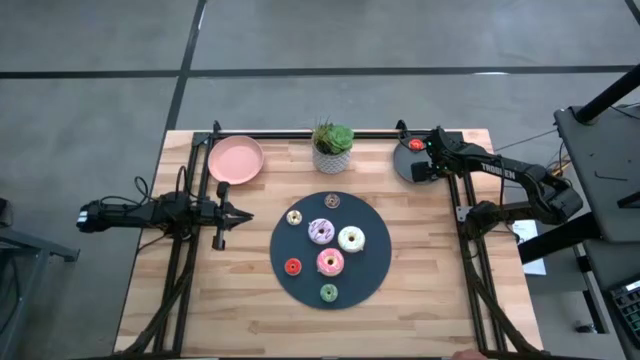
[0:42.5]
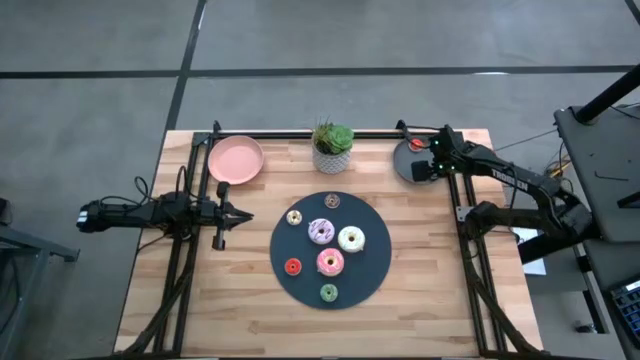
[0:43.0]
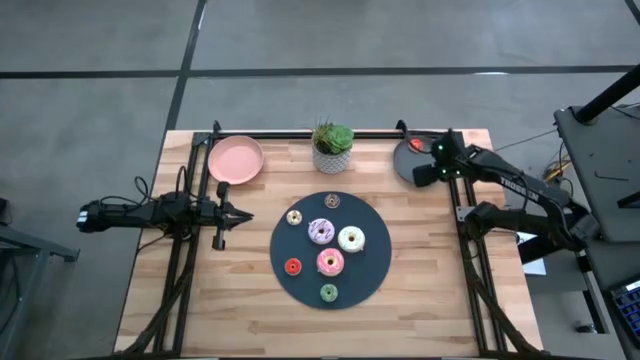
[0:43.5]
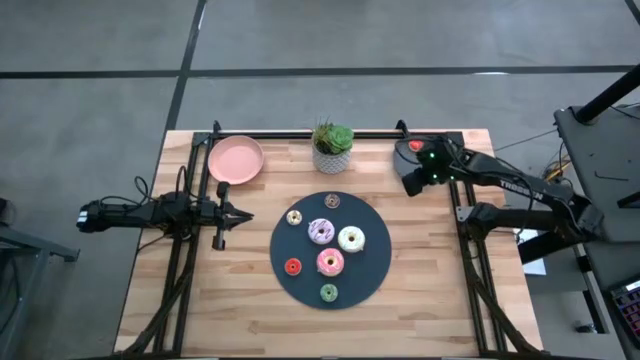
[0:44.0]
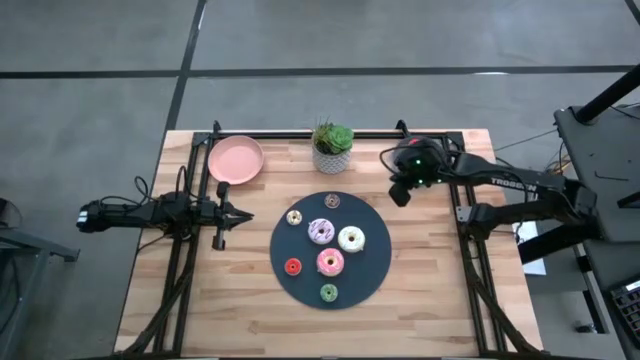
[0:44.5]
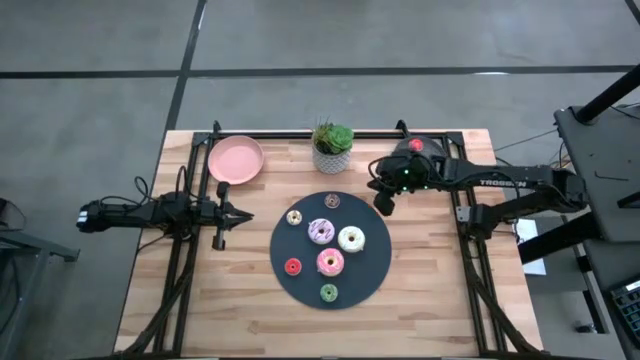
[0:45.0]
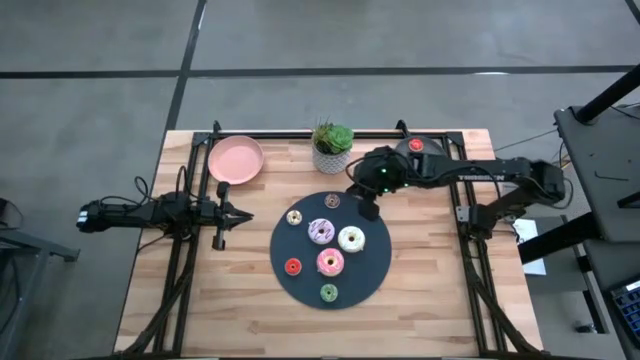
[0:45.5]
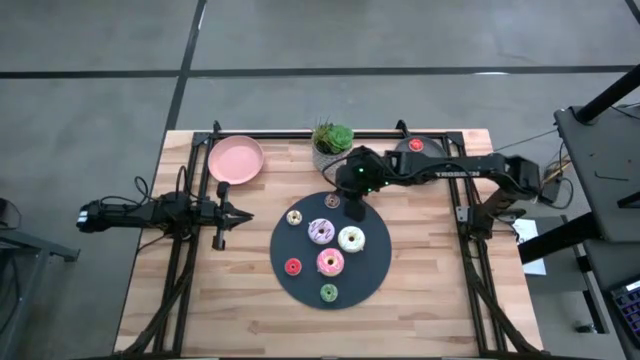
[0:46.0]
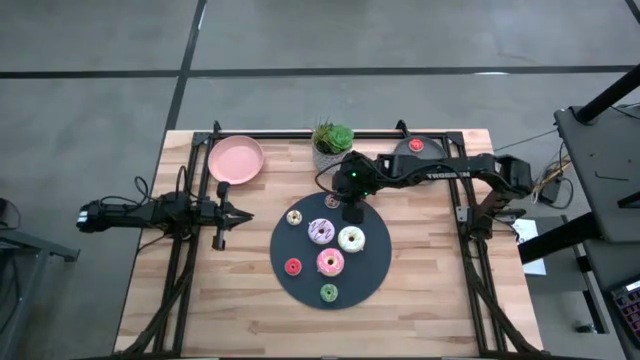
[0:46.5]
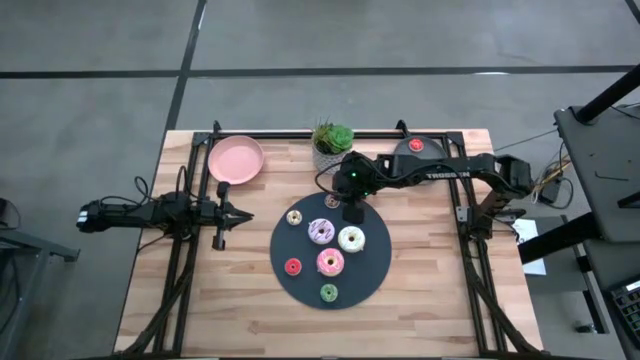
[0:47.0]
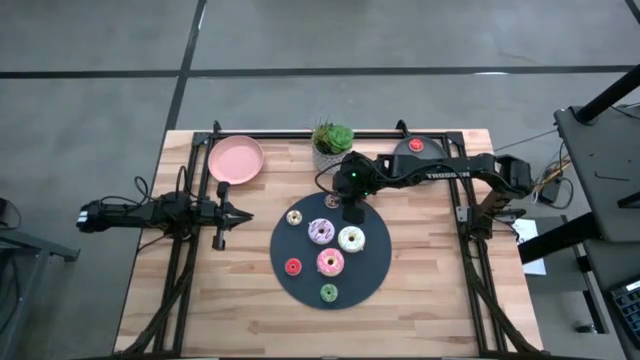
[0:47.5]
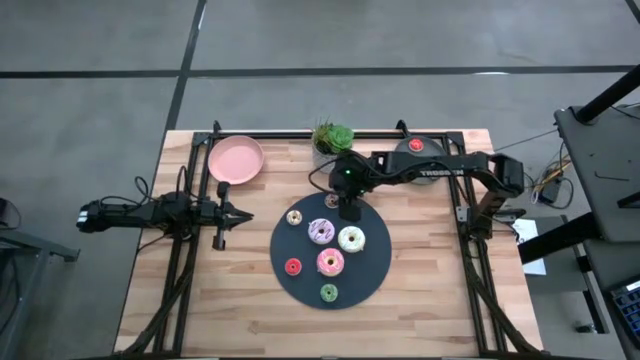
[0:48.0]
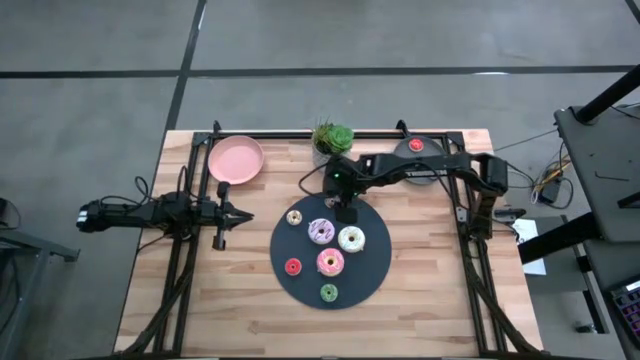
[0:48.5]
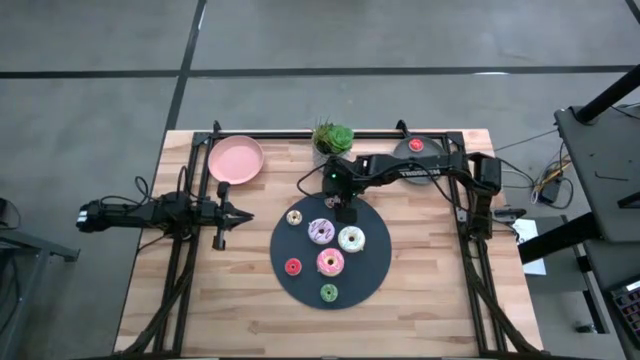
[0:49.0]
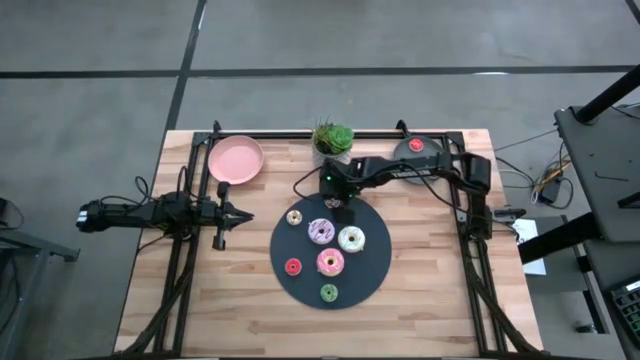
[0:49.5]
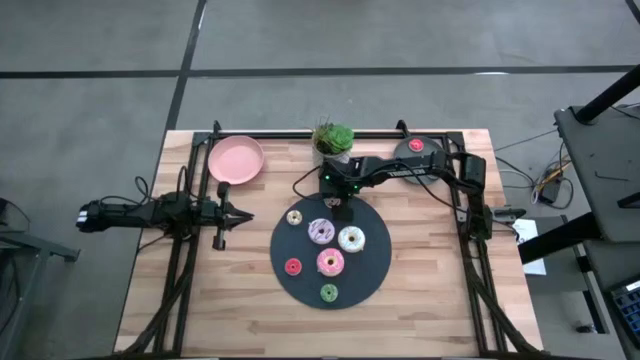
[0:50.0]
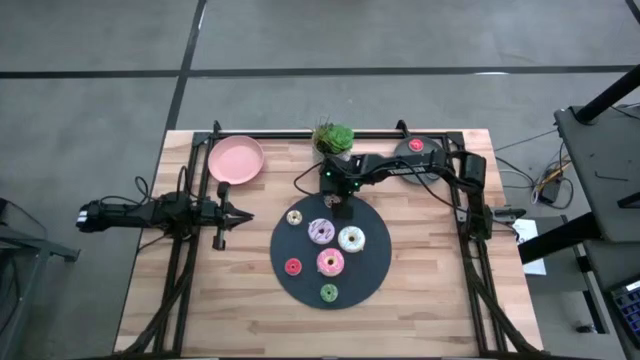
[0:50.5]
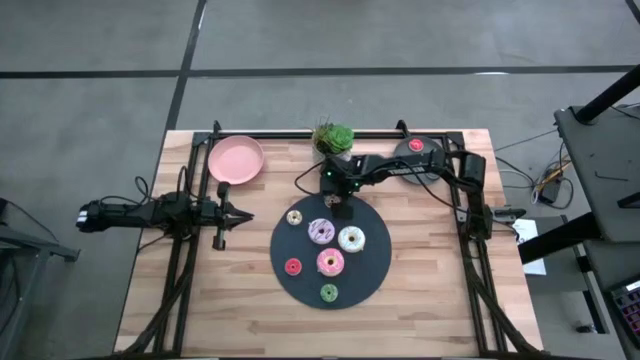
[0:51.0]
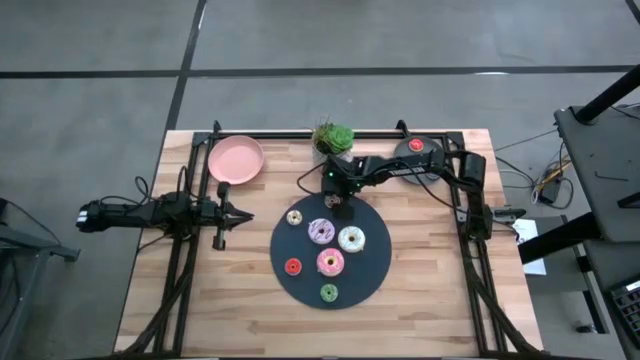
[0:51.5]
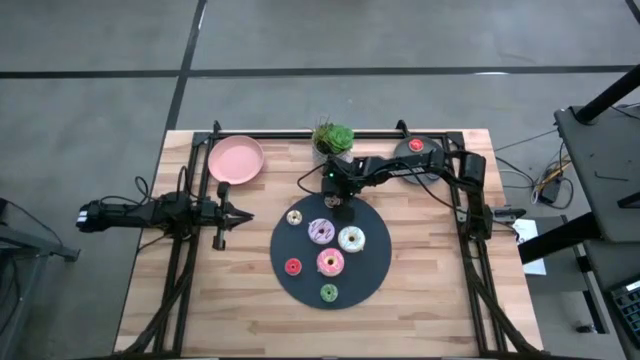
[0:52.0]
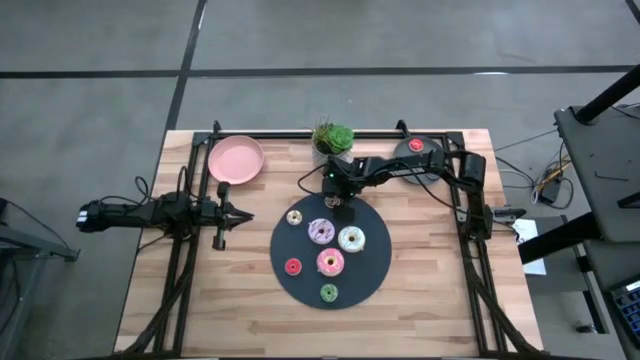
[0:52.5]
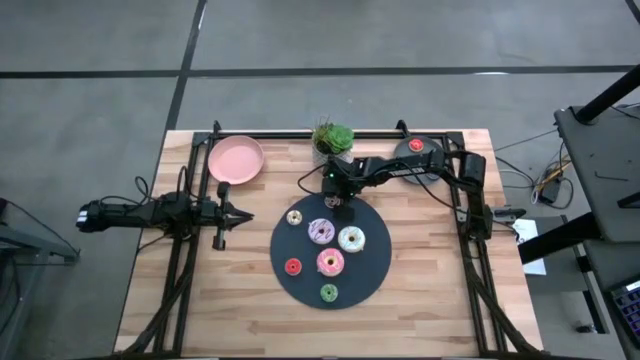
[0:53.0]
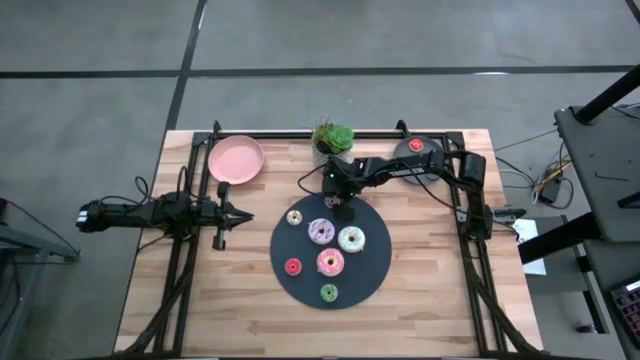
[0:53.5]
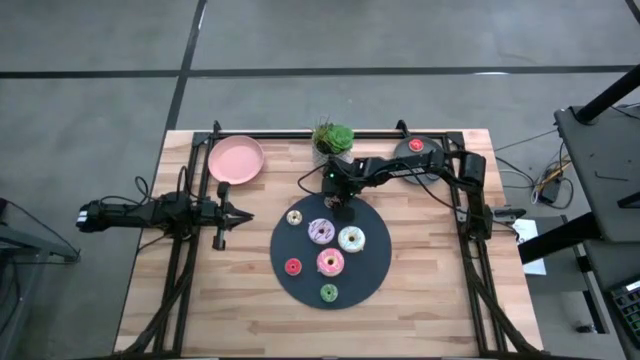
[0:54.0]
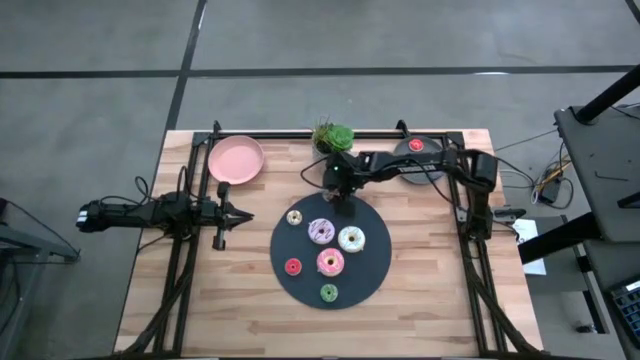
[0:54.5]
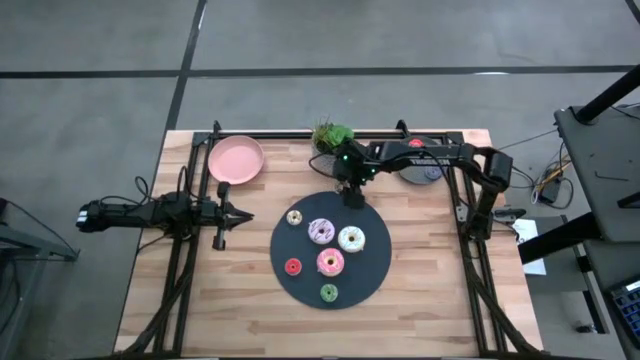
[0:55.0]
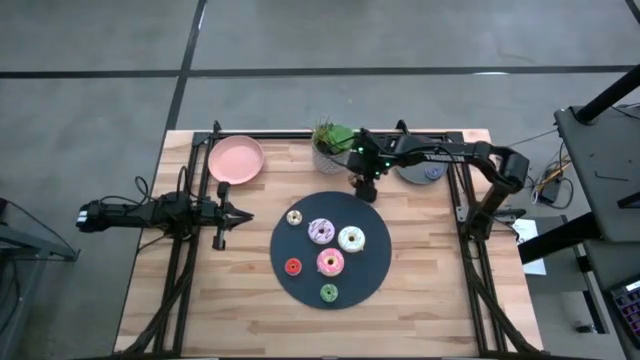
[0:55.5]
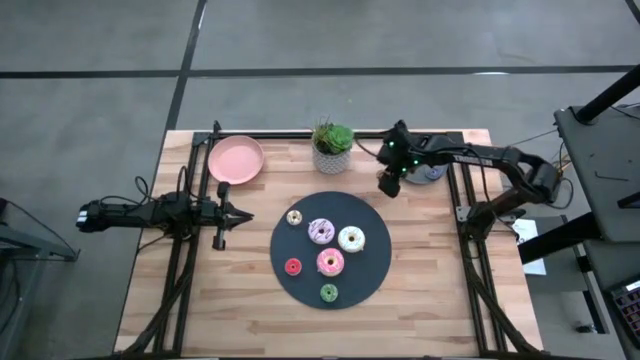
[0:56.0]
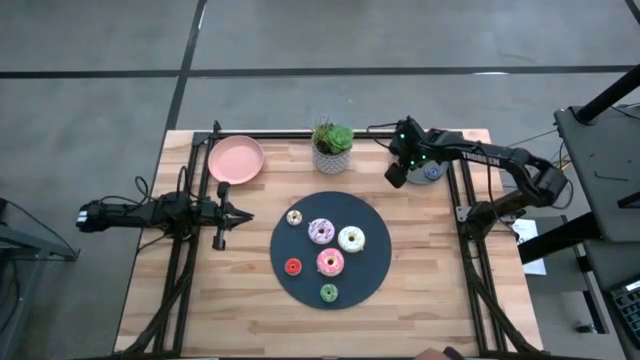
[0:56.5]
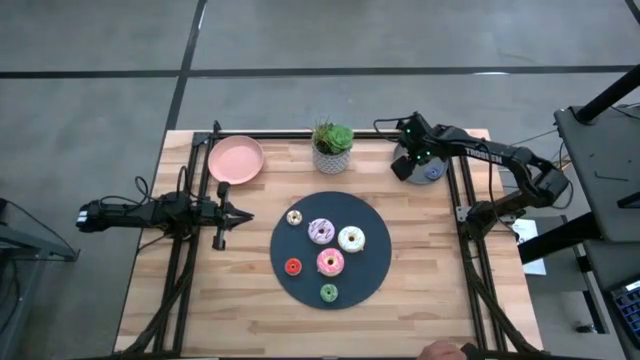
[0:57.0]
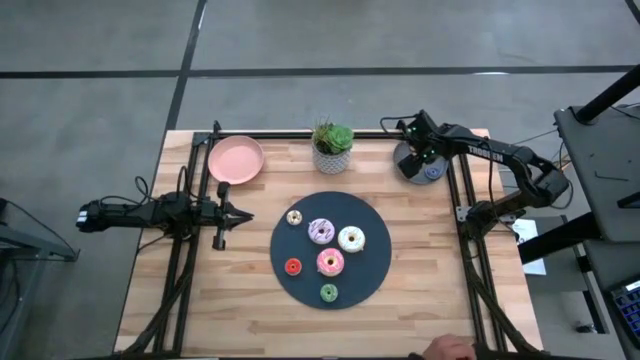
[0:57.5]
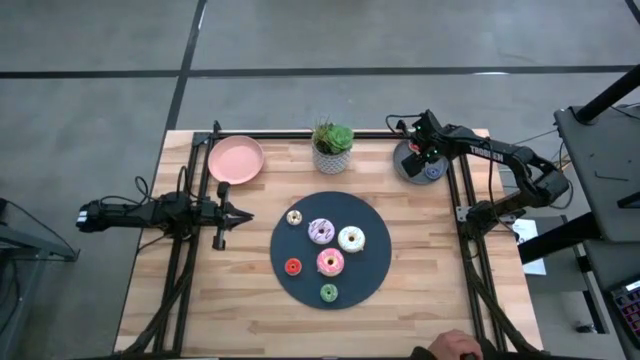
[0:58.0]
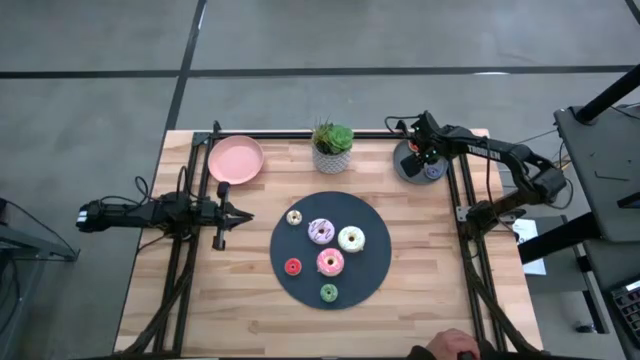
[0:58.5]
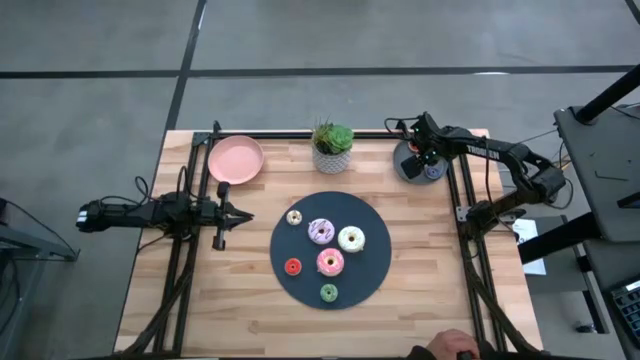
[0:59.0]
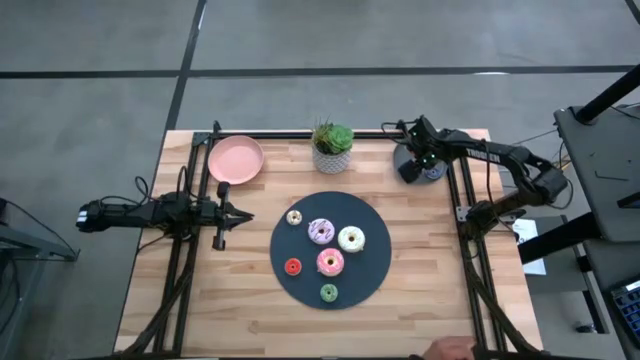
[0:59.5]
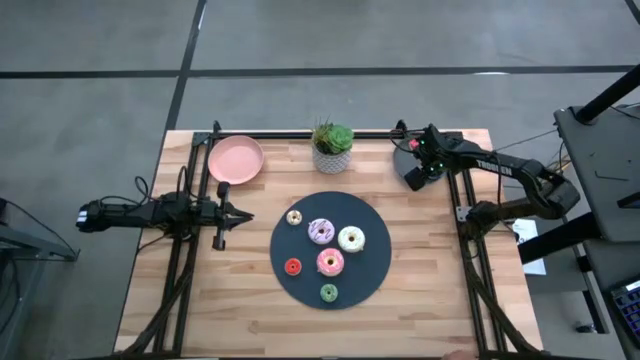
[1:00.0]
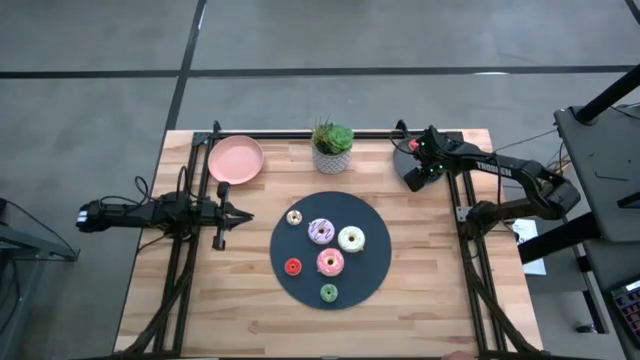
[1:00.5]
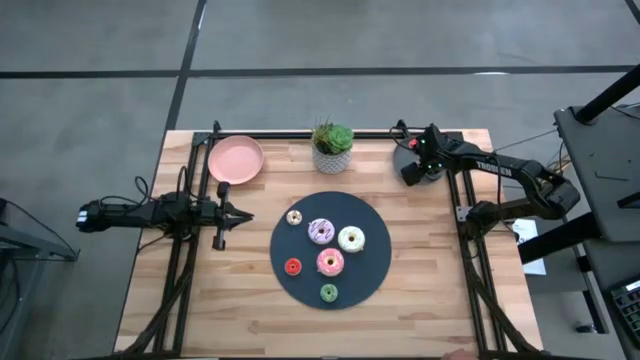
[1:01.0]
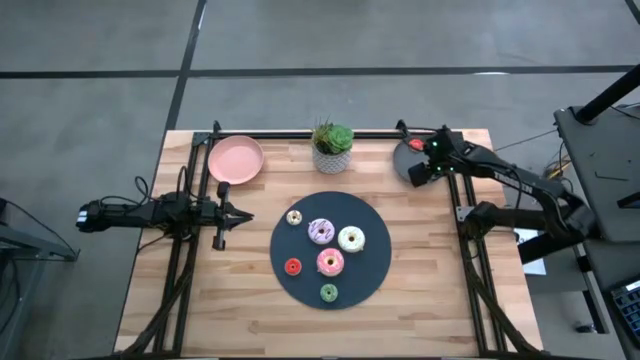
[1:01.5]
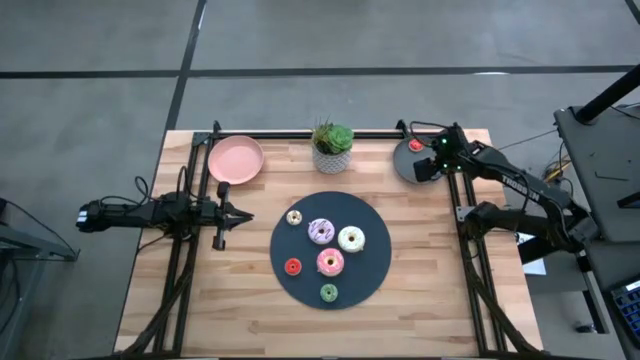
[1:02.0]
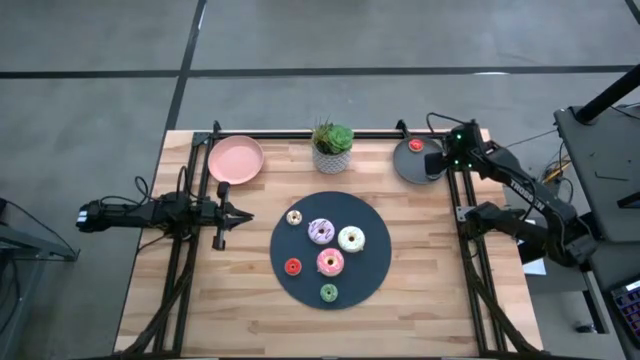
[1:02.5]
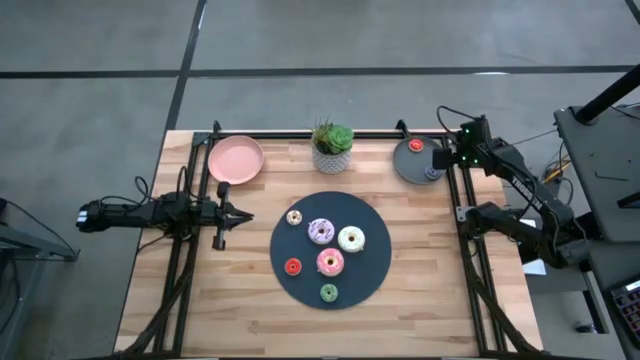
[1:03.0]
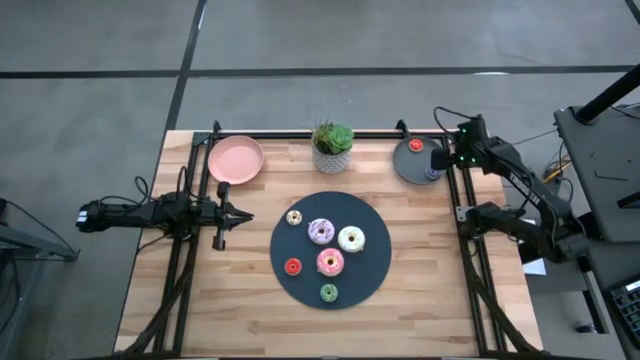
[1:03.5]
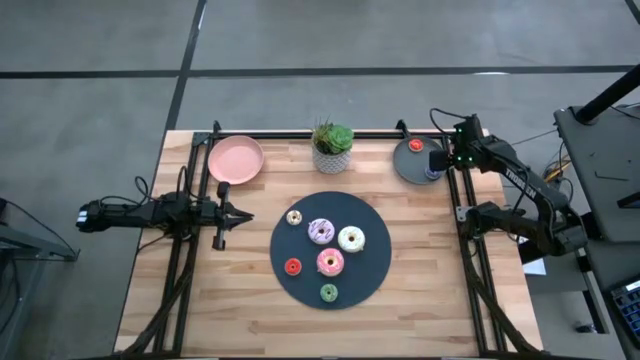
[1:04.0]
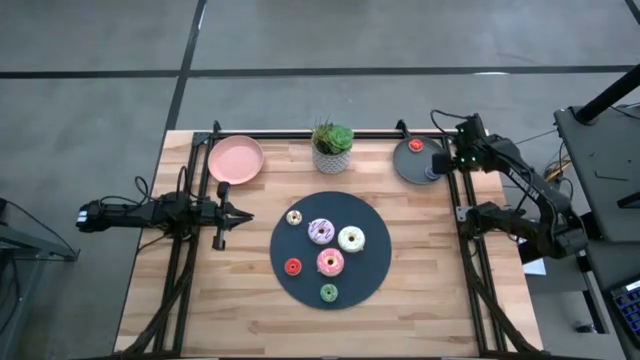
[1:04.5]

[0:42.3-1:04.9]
Task: Pick & Place donuts
Put the small brown donut on the gray plate
